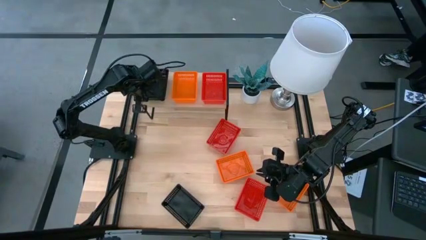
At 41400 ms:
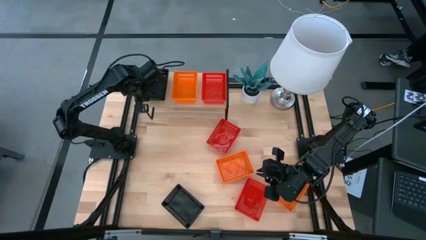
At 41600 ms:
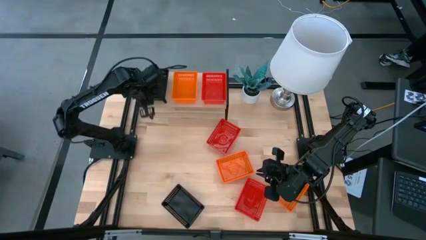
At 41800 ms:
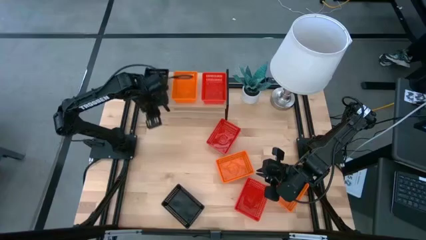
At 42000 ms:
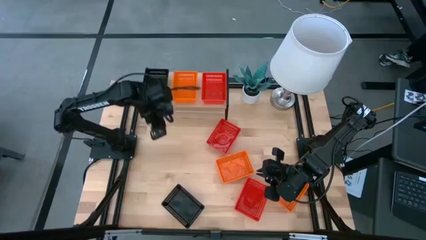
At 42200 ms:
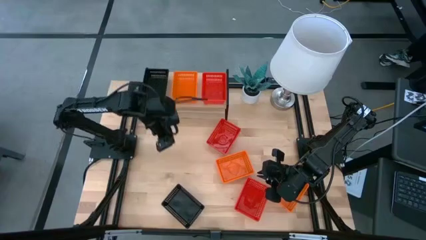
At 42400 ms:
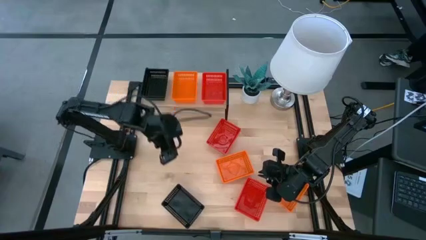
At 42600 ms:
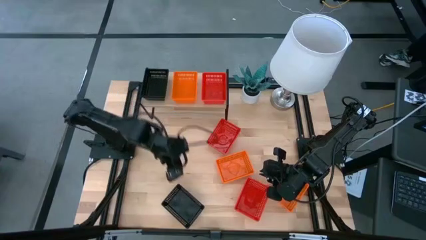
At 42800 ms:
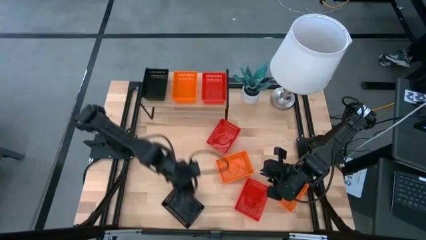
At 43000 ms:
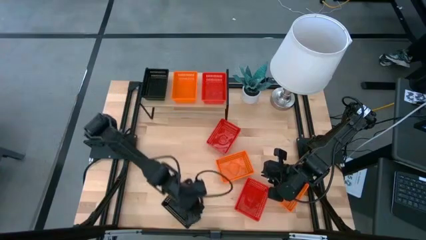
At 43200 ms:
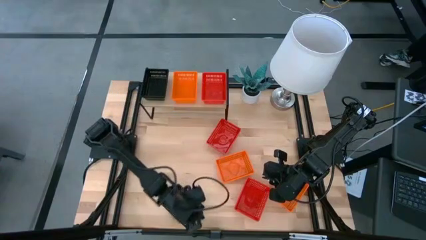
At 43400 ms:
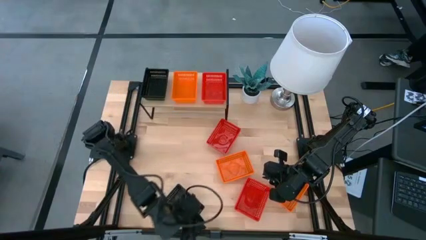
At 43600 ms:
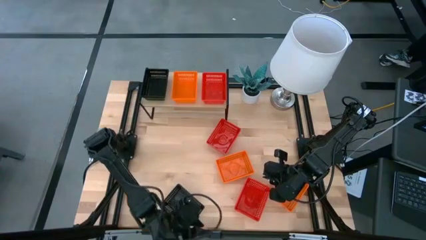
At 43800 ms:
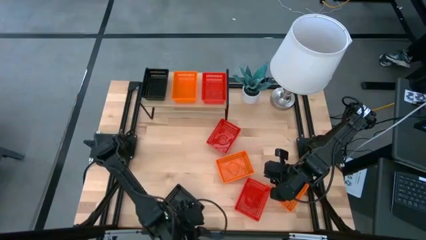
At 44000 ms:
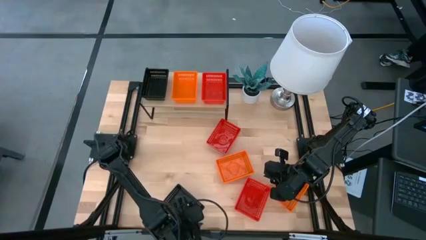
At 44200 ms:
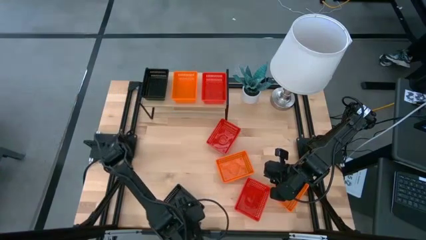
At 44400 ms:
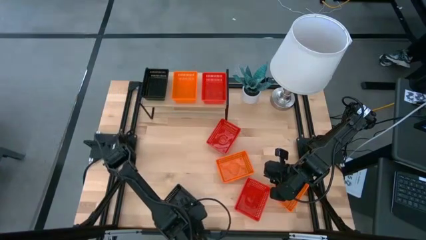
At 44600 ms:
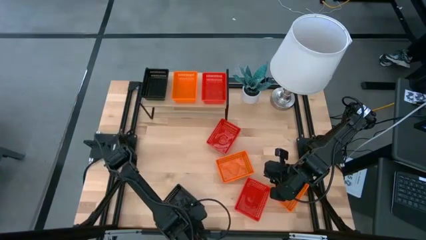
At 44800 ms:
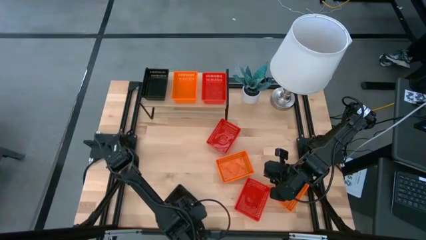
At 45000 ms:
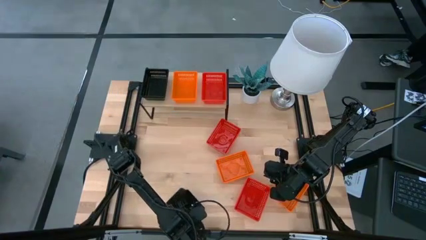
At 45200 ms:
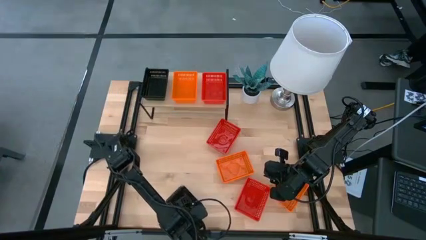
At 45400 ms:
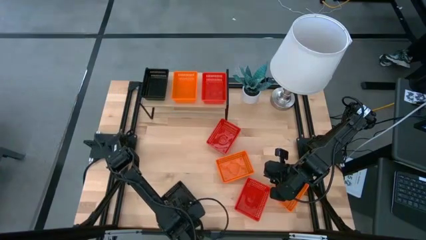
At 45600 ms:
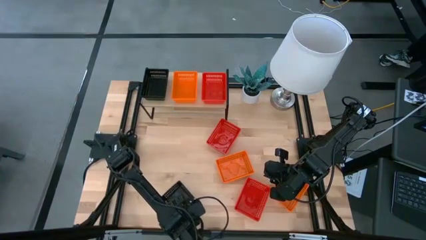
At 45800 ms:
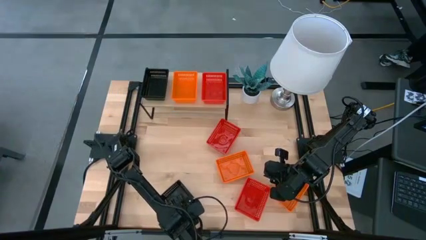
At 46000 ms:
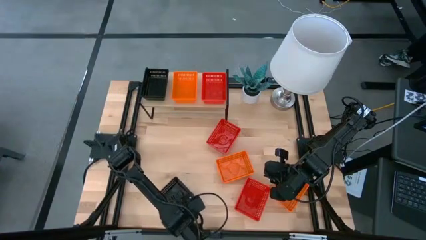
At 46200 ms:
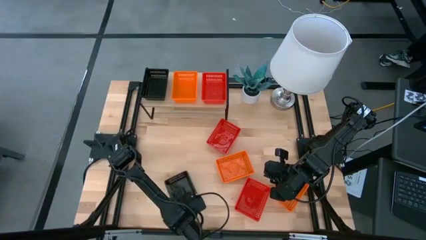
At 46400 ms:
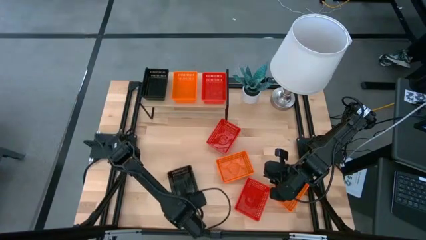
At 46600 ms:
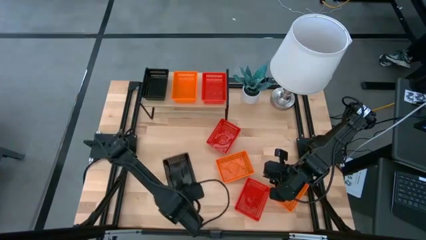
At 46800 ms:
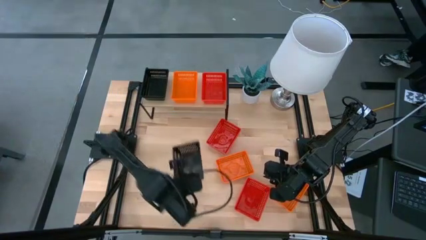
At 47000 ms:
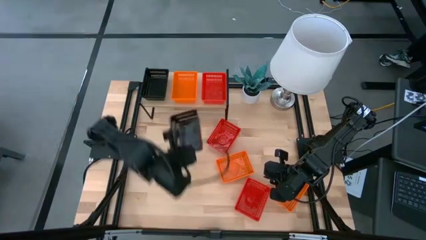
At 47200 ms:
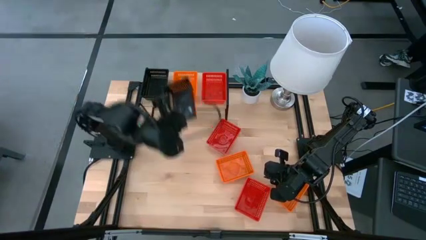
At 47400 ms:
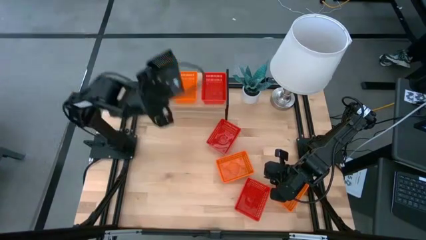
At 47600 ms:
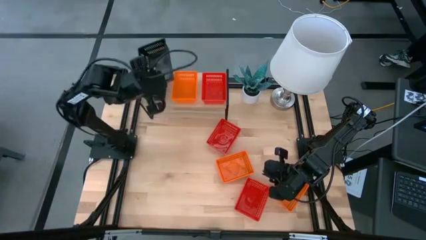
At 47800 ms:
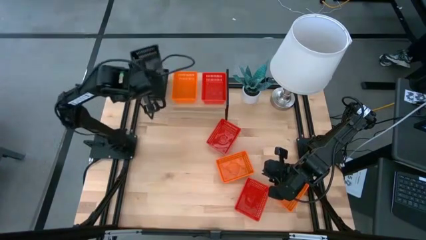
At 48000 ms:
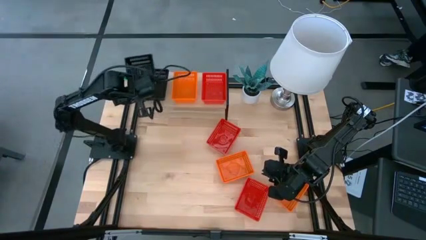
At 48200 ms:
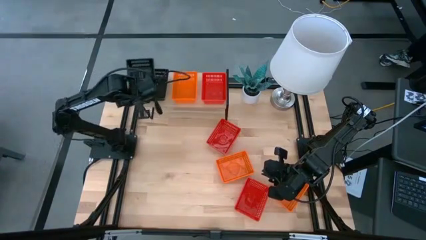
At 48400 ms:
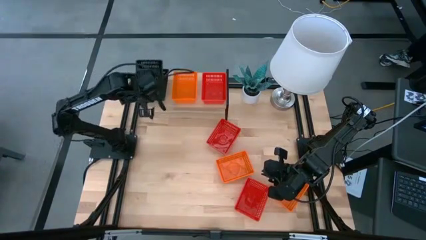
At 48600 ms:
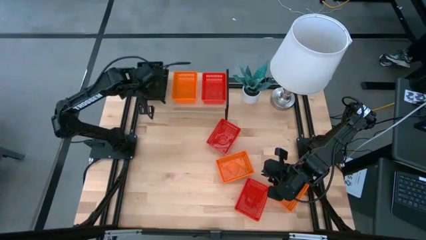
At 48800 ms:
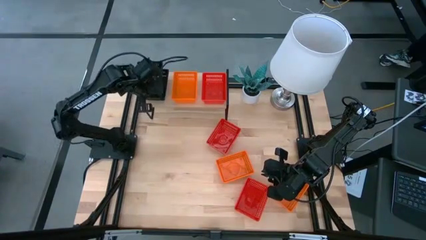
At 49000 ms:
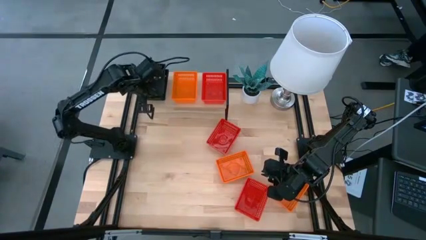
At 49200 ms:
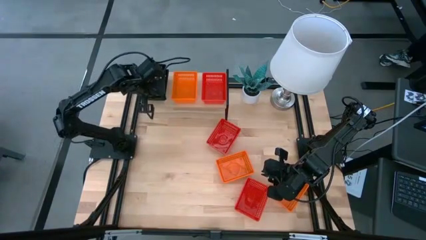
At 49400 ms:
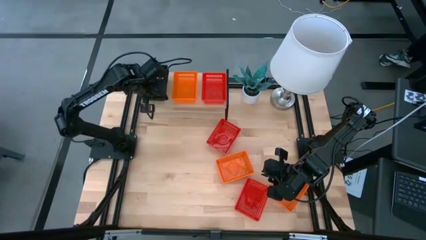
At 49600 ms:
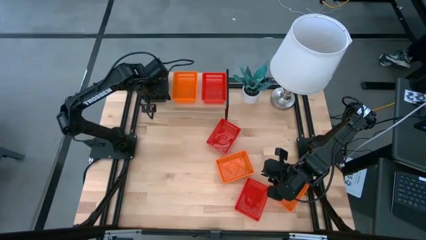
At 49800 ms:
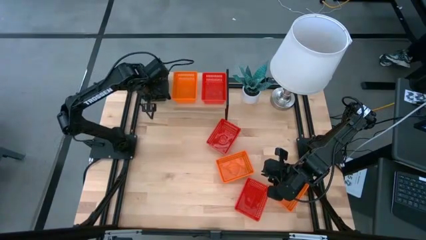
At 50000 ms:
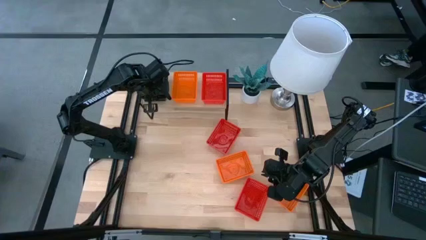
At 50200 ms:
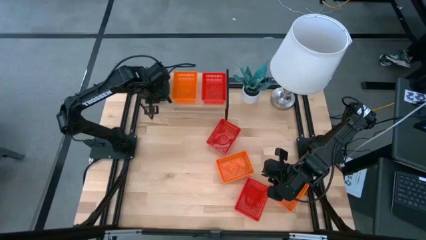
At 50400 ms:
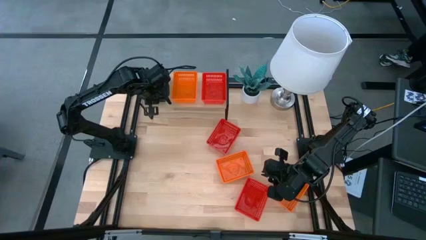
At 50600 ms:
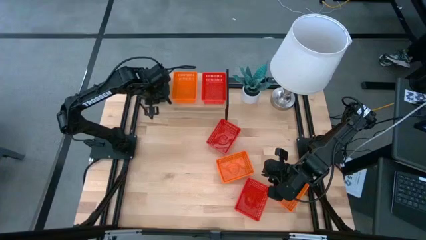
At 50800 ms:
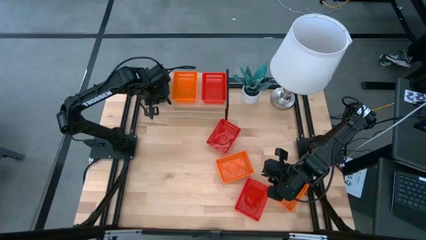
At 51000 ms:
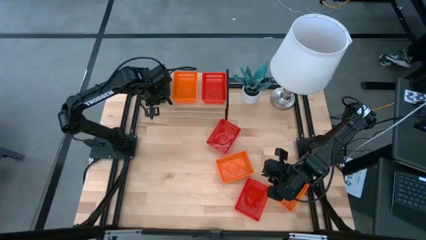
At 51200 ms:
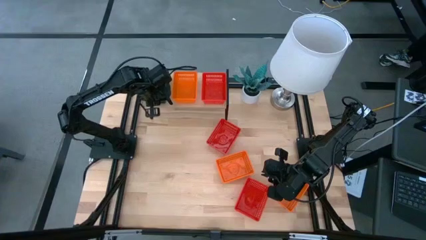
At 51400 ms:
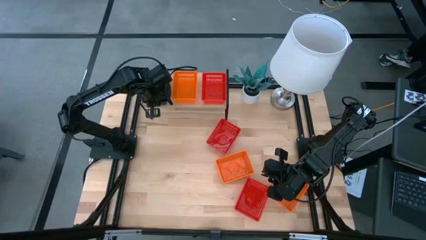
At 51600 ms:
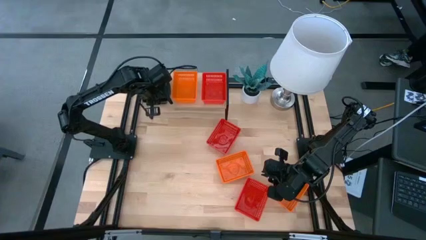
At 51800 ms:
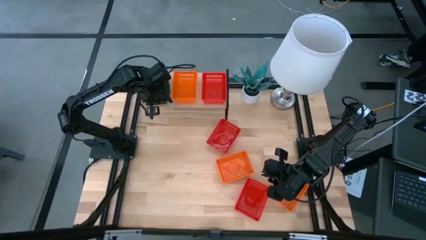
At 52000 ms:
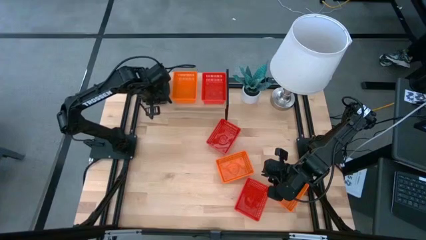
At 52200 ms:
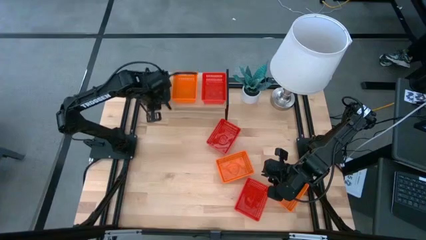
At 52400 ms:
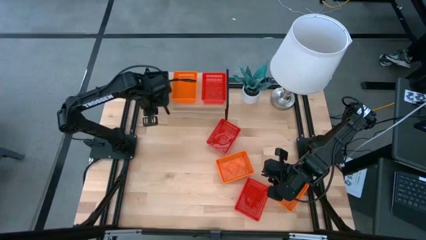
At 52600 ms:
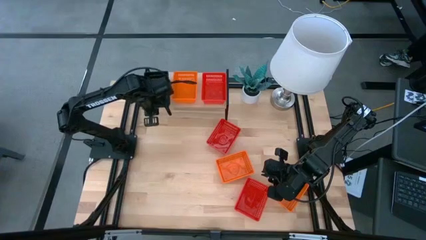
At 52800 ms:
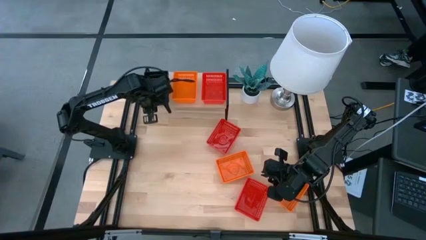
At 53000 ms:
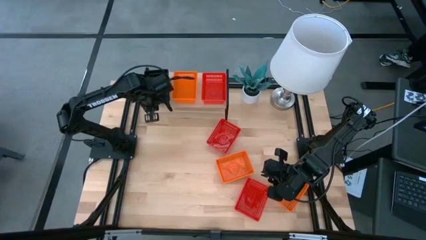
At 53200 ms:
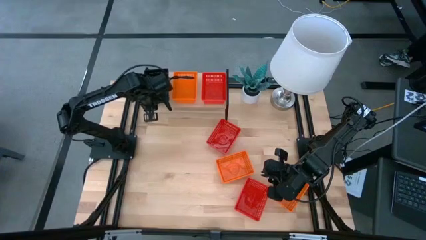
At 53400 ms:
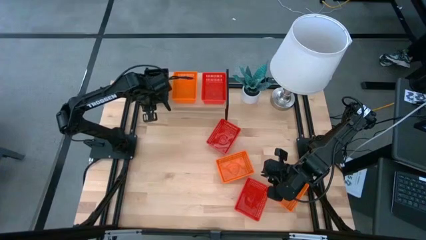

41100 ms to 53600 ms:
Task: Stack baskets on shelf by color
Stack the black bin on top of the other stacked black bins on the shelf
